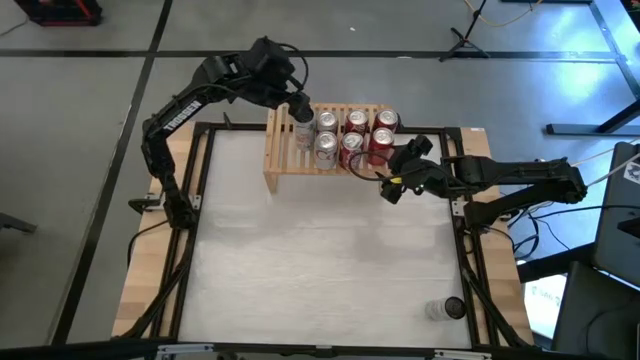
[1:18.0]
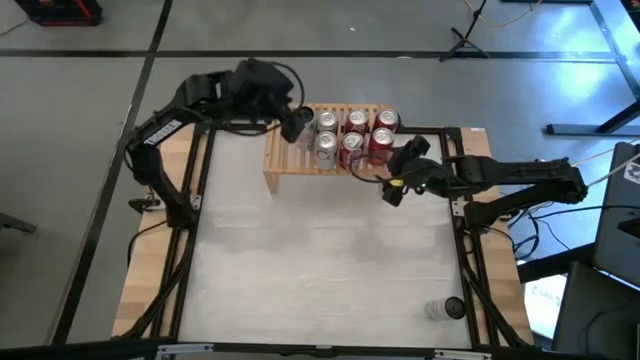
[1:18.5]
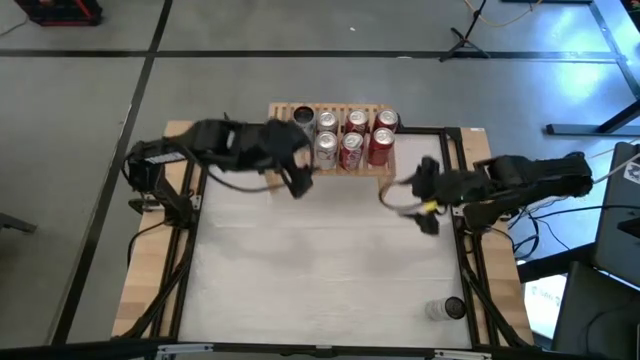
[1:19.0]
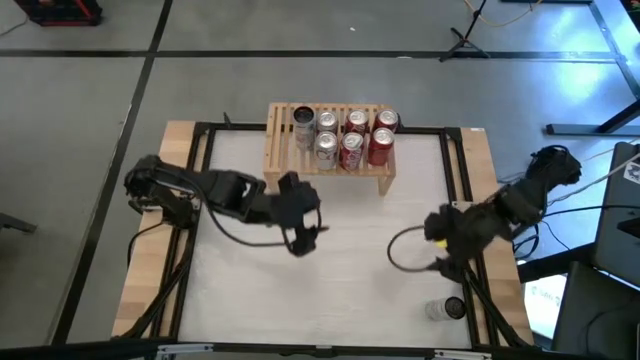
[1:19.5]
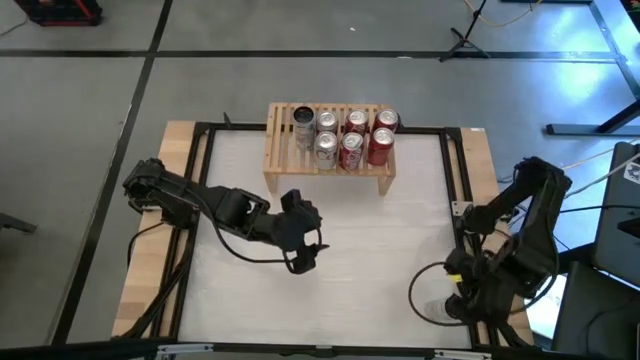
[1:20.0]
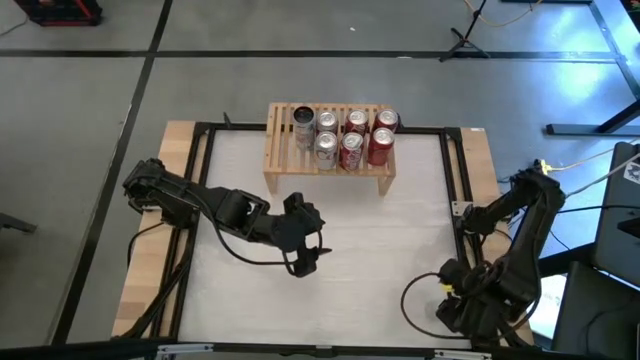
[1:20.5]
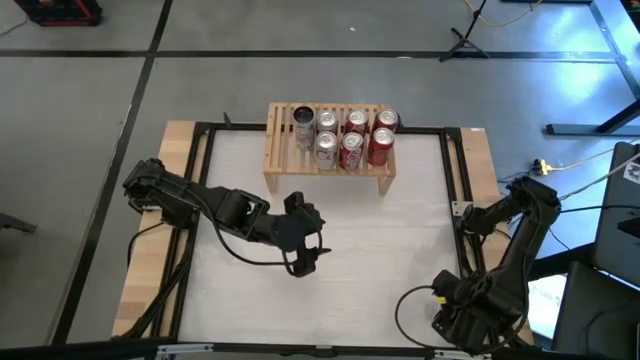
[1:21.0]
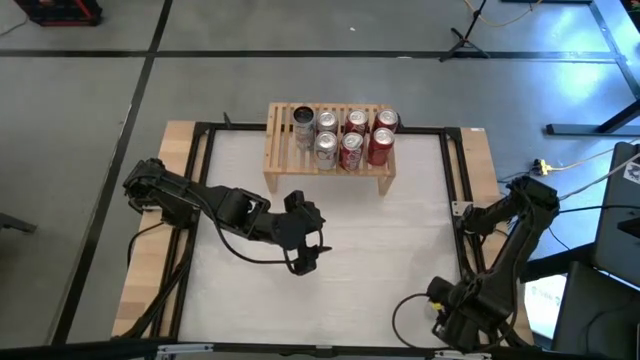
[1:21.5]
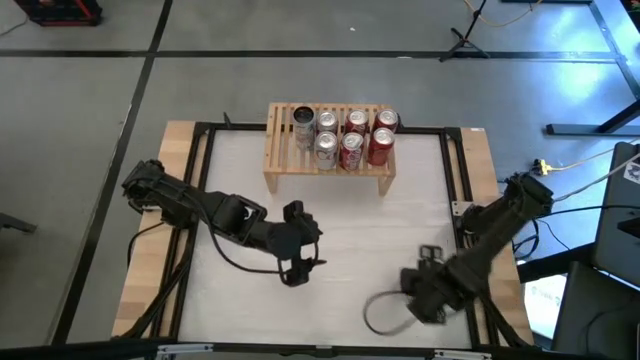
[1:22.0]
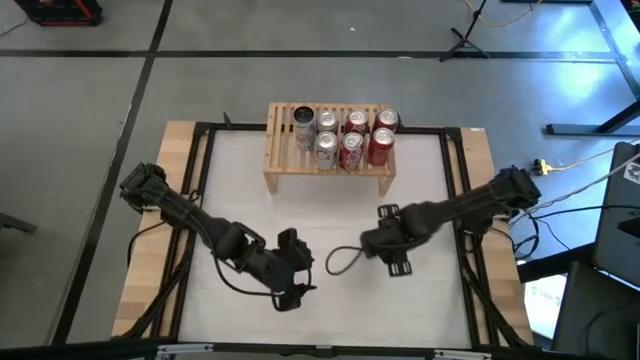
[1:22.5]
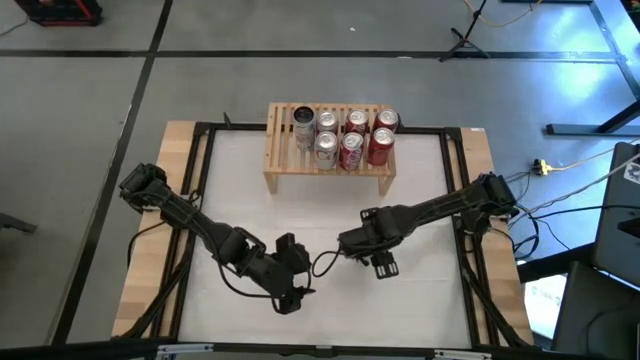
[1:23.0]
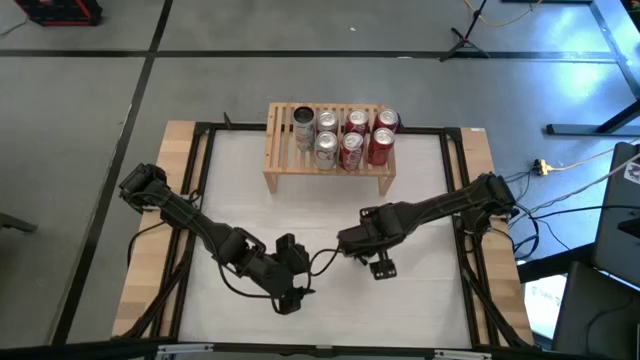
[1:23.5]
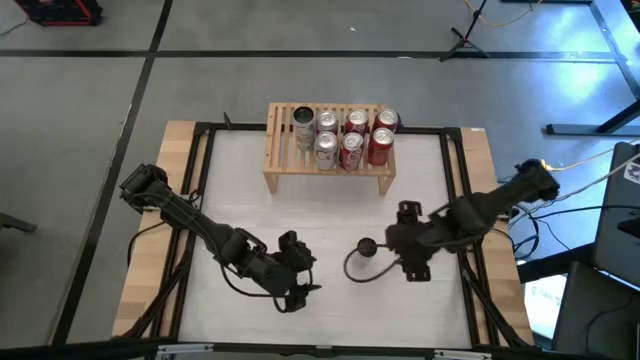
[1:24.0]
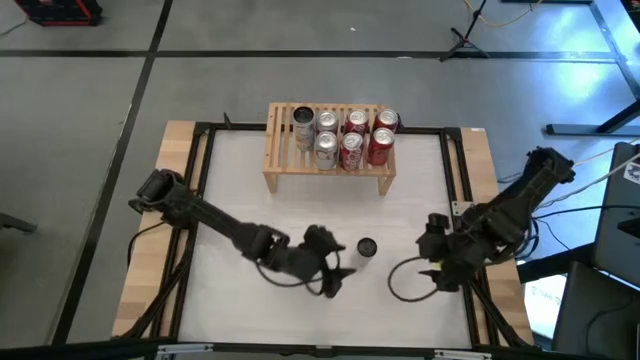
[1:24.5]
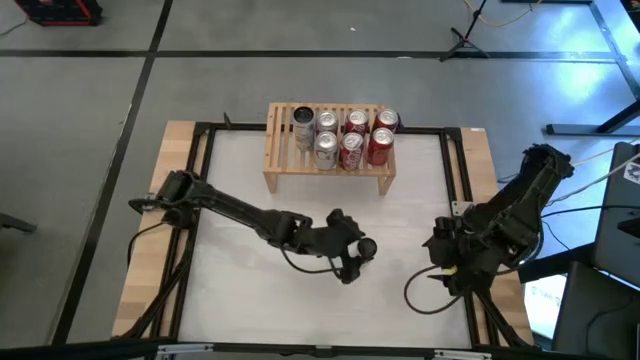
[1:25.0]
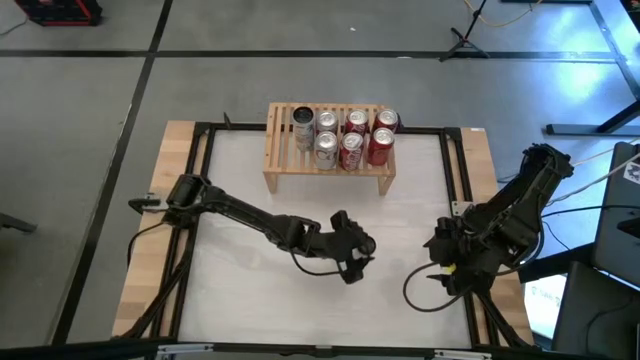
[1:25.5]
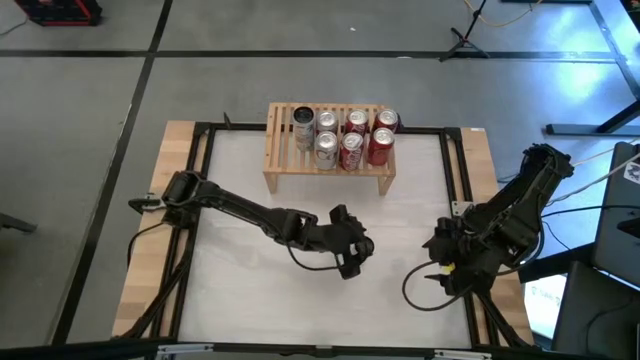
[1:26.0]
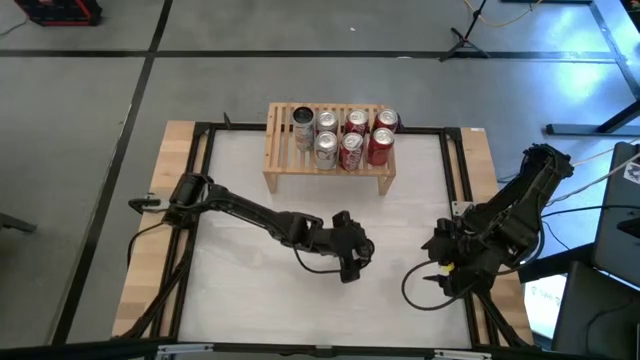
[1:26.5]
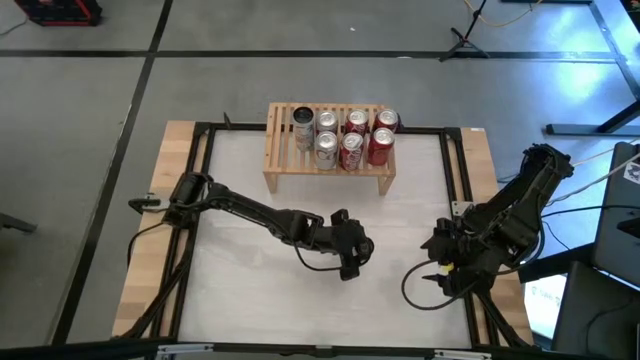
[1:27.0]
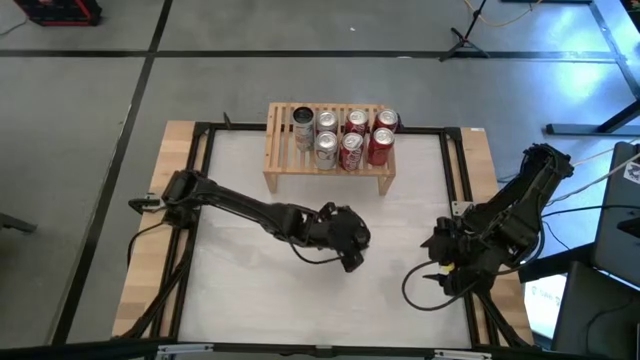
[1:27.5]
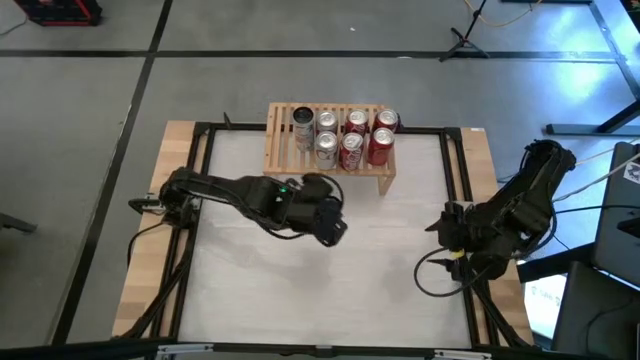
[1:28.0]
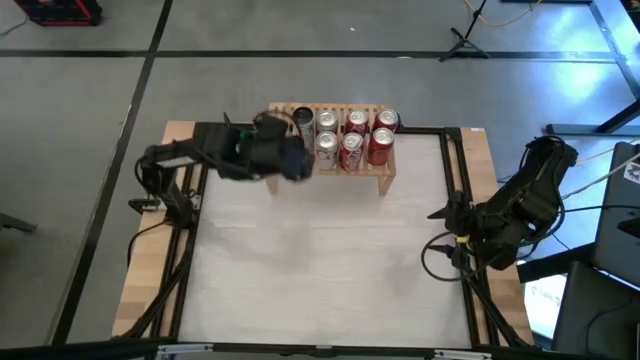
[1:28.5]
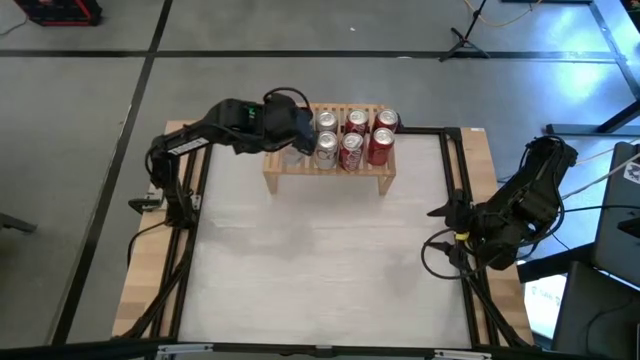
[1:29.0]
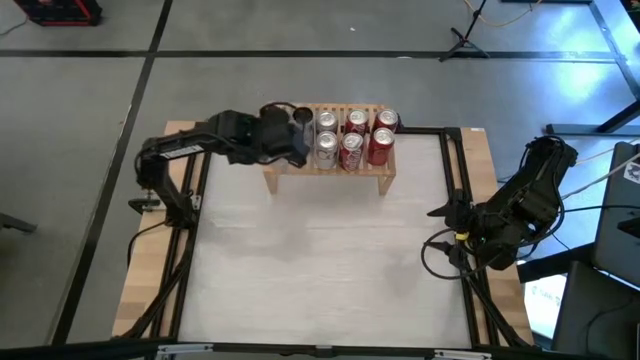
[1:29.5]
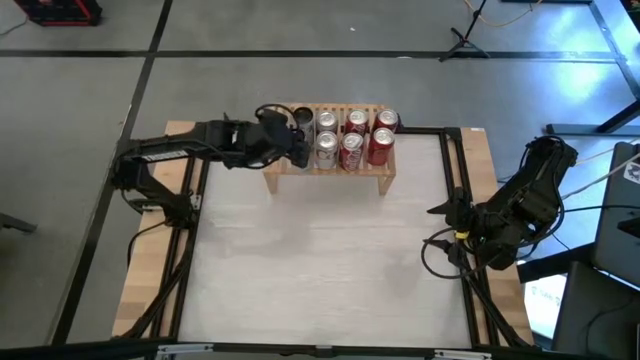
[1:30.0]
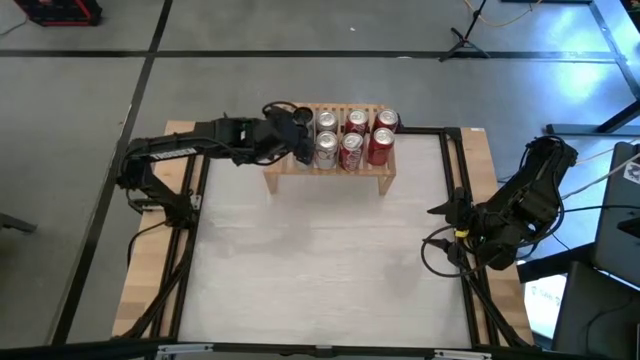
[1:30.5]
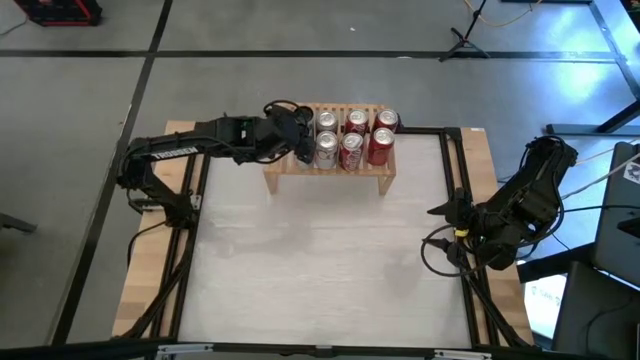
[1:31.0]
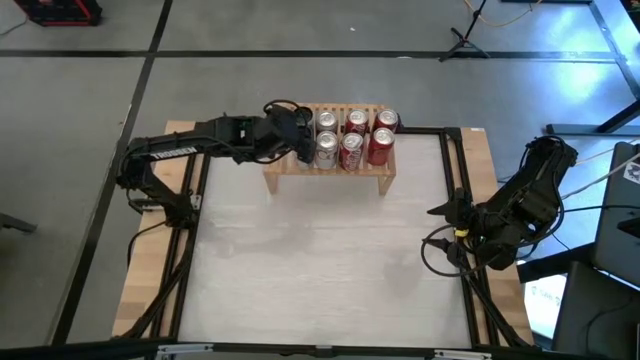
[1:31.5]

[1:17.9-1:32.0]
Task: Place canned beverage on shelf
Put the white pink soda can aligned with the other white pink soda can on the shelf

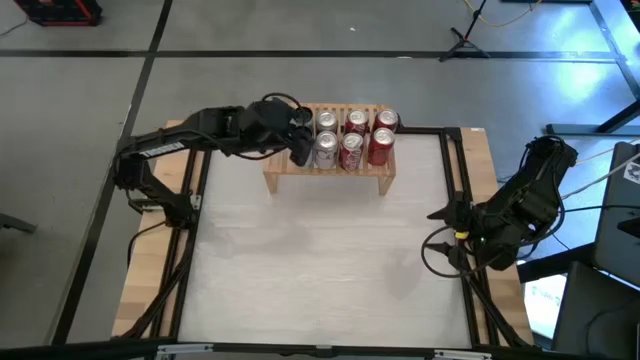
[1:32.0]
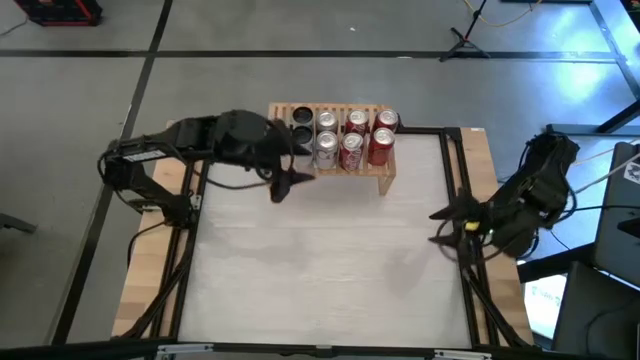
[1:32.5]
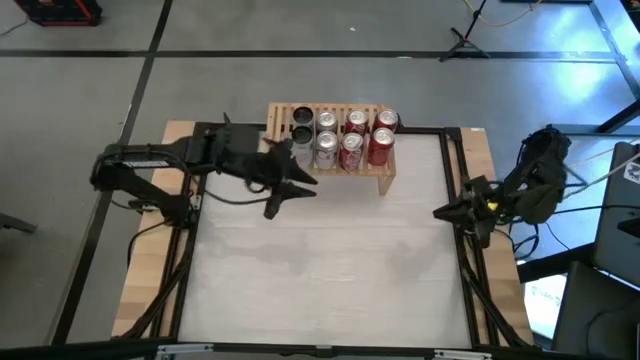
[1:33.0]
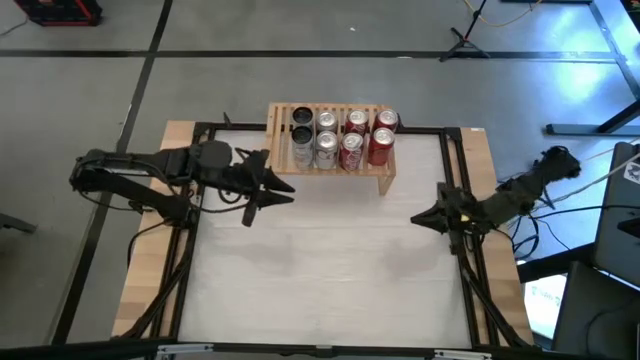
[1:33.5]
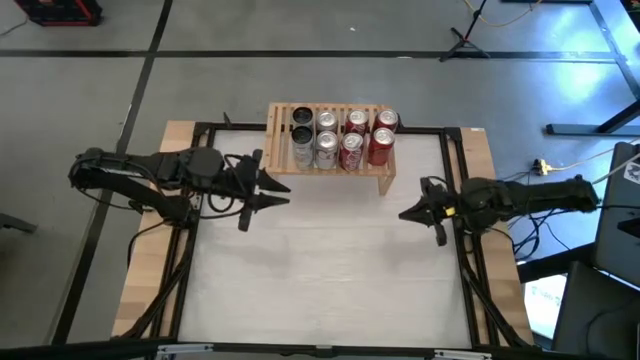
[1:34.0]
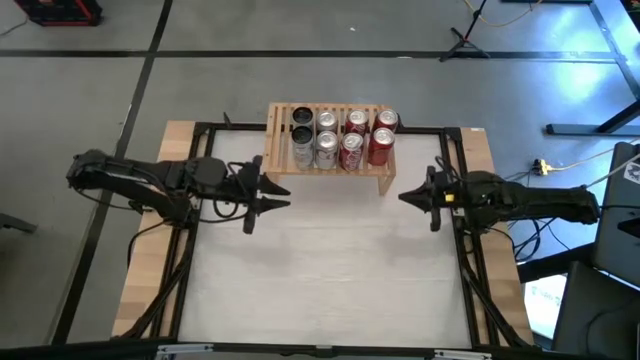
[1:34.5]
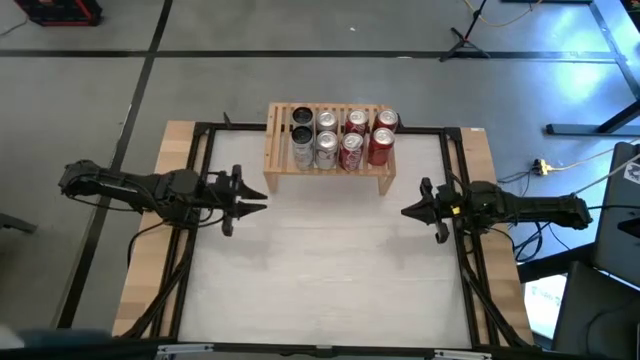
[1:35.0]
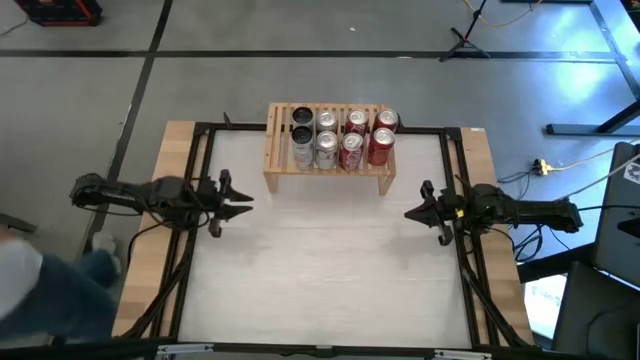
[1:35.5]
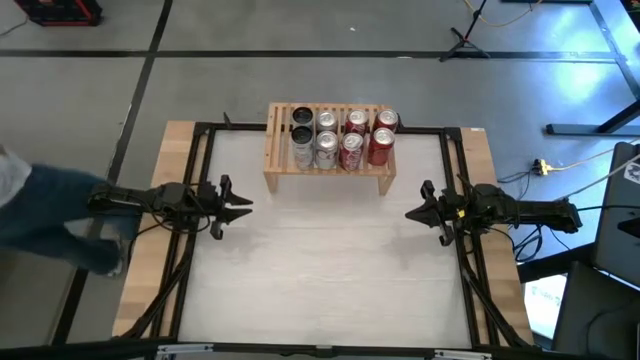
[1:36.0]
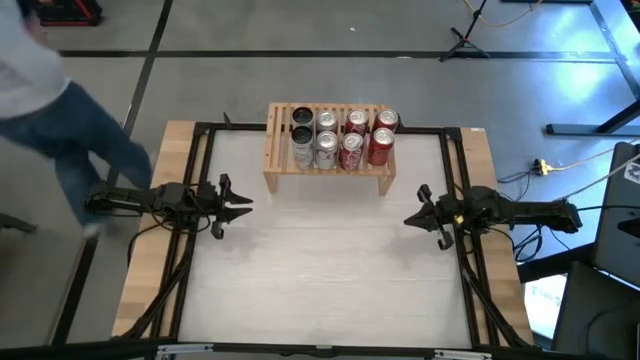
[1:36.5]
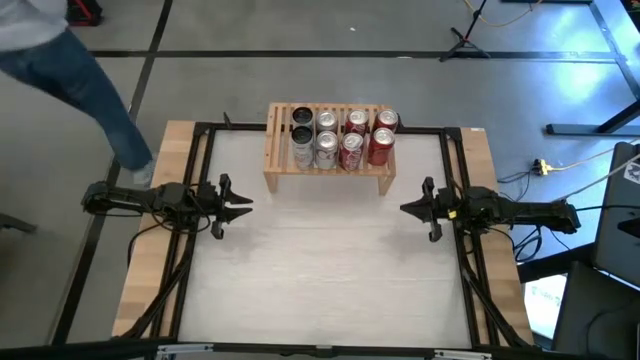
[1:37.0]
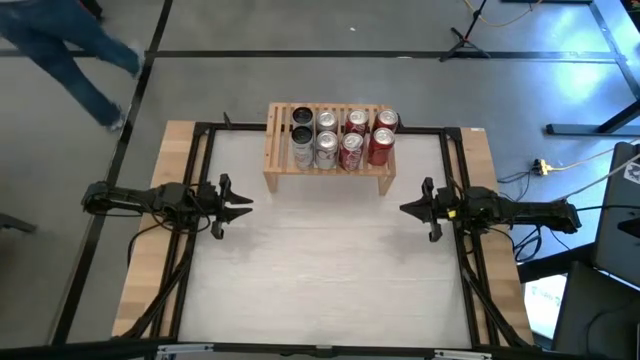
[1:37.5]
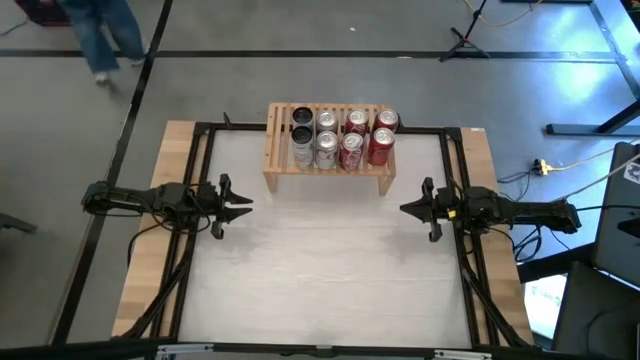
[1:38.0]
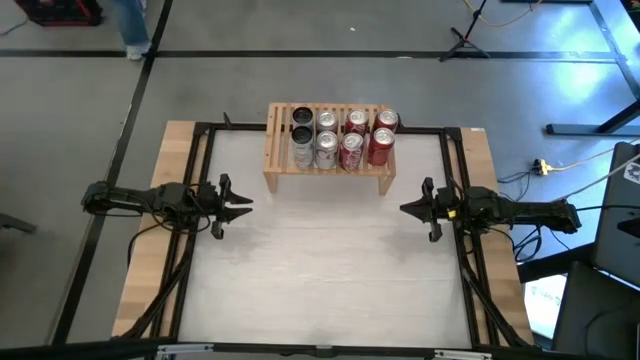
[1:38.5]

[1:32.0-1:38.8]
Return to Home Position

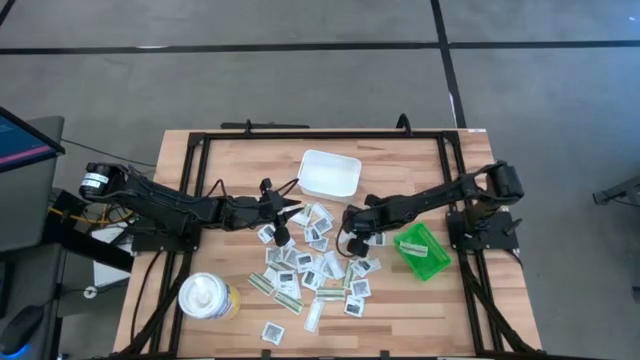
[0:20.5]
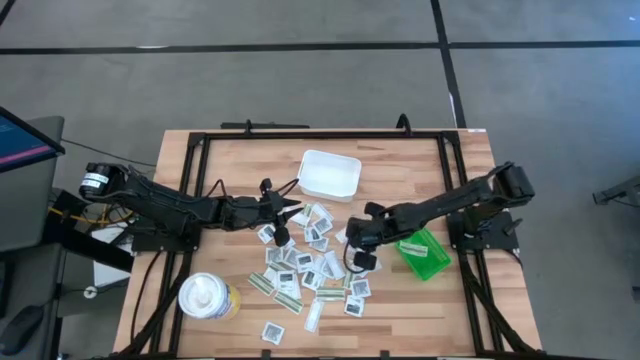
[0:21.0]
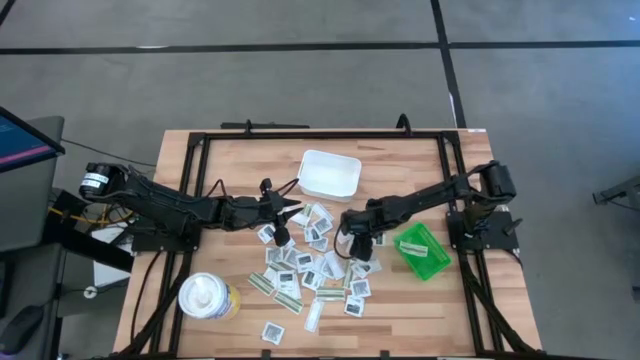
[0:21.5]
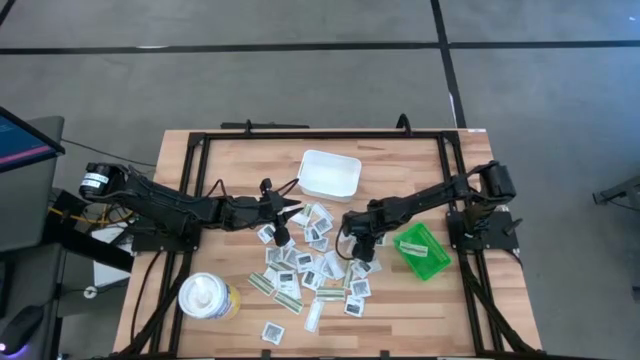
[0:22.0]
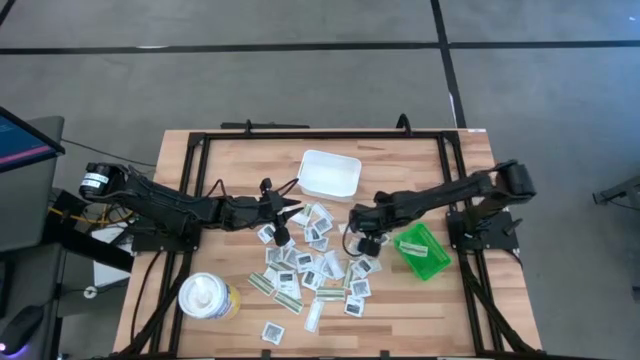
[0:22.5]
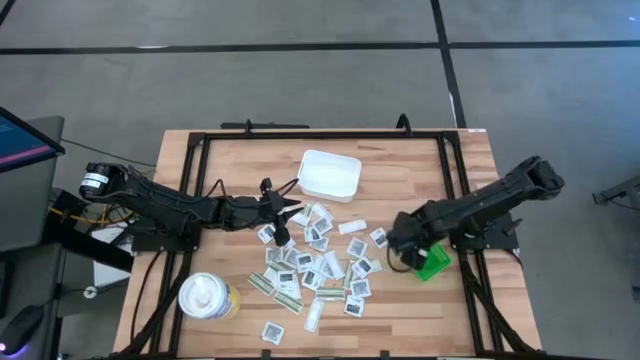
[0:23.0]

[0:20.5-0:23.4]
Task: Pick & Place First Aid Supplies
Put the bandage pack into the green bin
